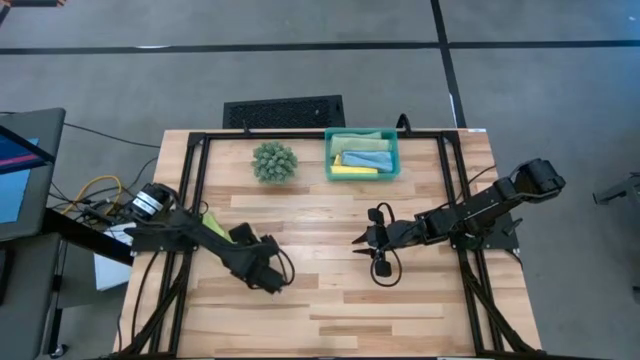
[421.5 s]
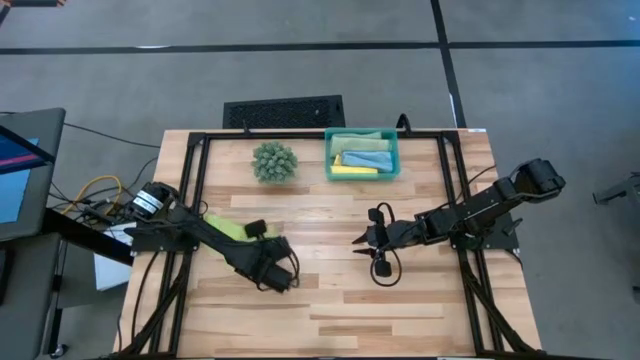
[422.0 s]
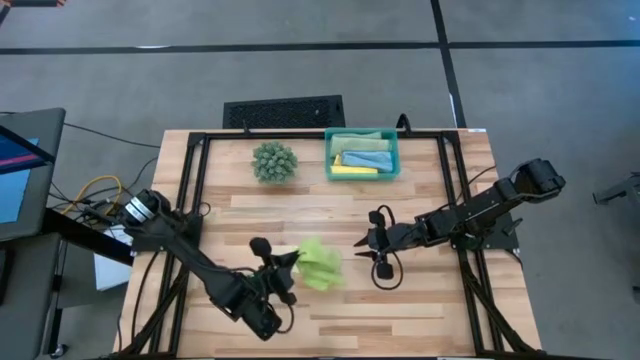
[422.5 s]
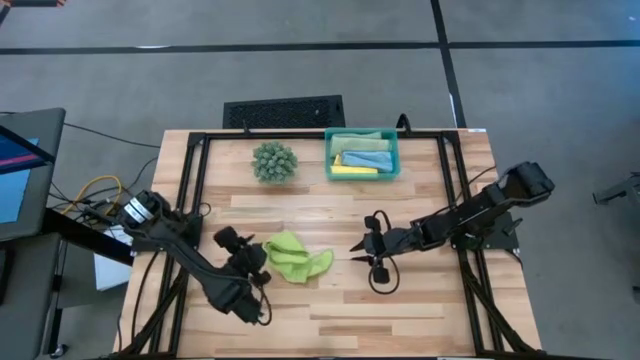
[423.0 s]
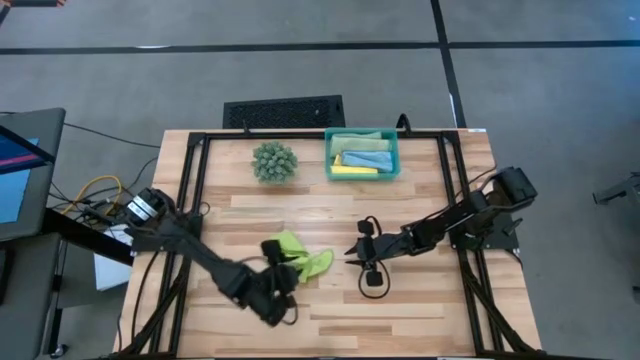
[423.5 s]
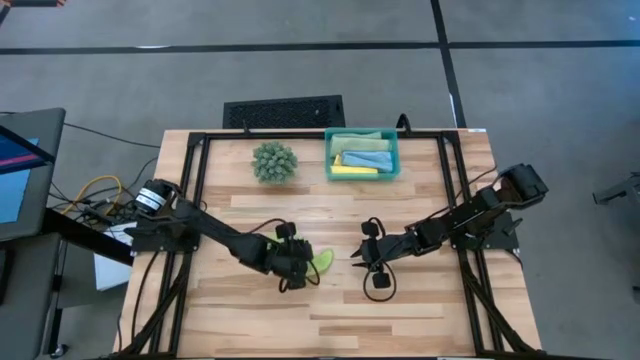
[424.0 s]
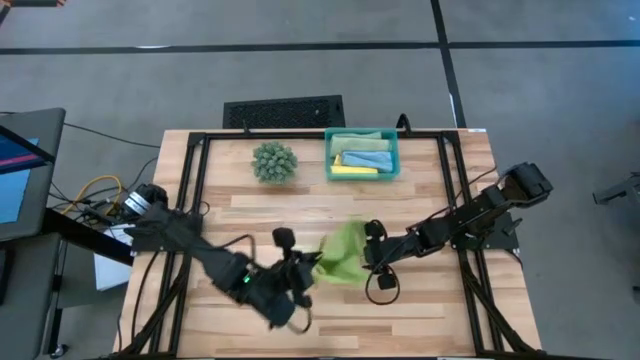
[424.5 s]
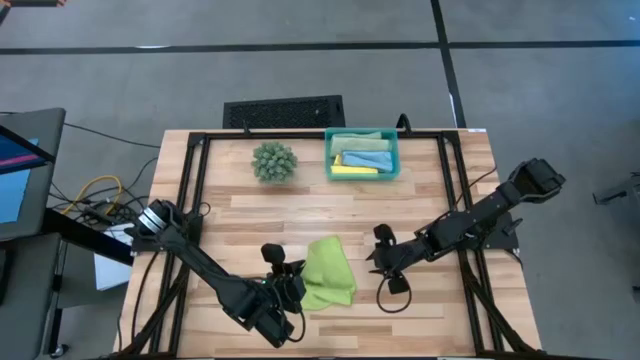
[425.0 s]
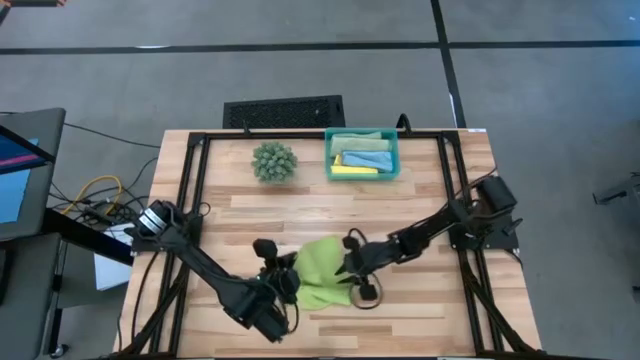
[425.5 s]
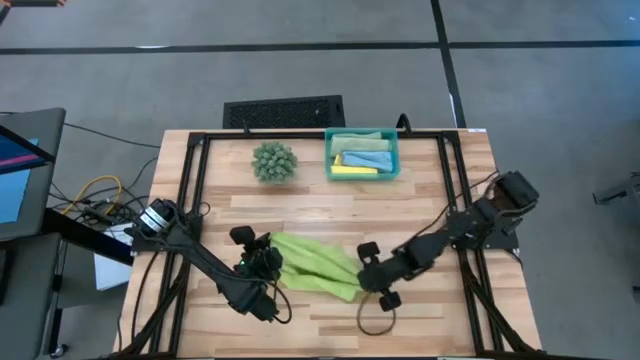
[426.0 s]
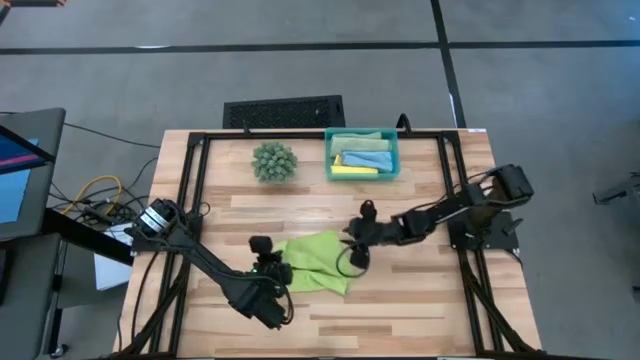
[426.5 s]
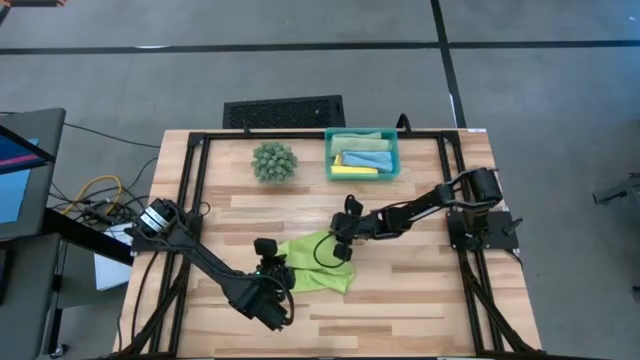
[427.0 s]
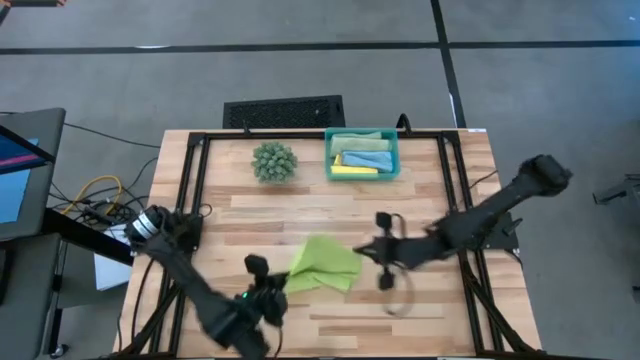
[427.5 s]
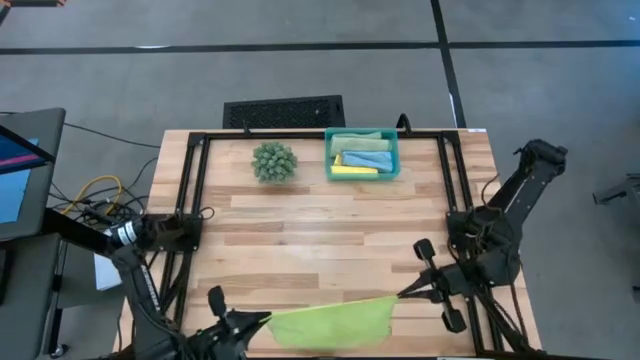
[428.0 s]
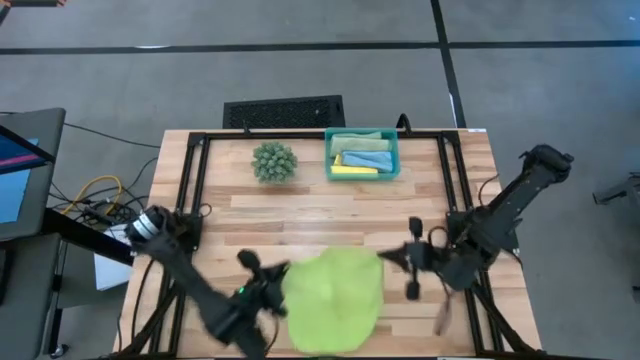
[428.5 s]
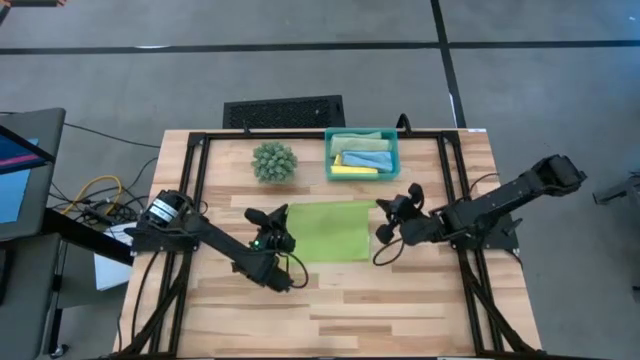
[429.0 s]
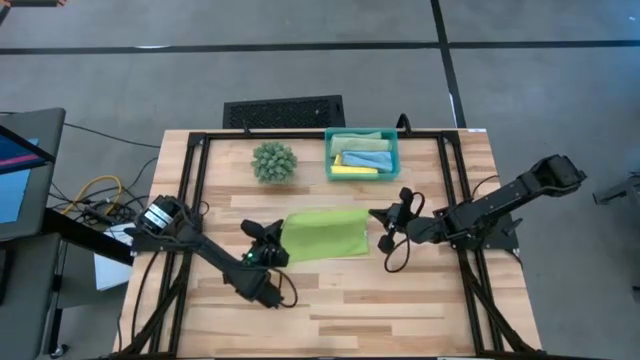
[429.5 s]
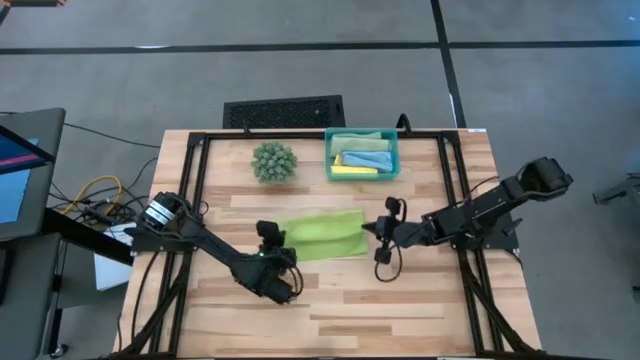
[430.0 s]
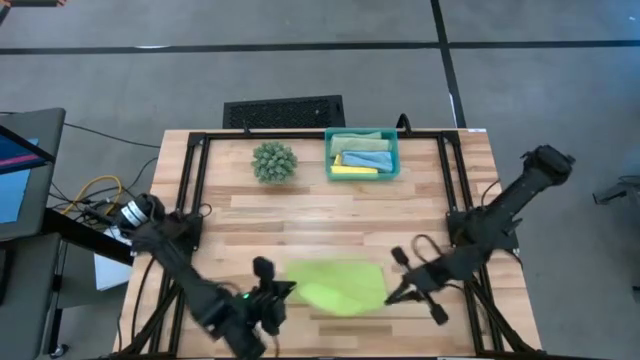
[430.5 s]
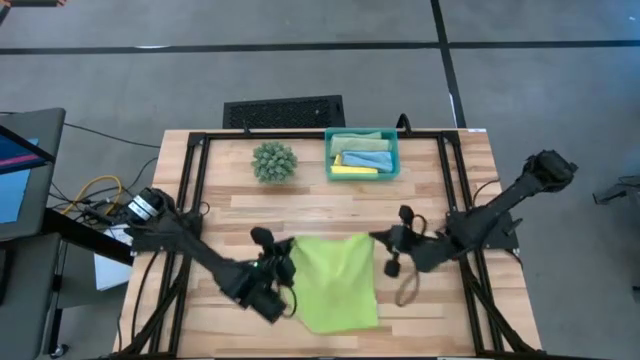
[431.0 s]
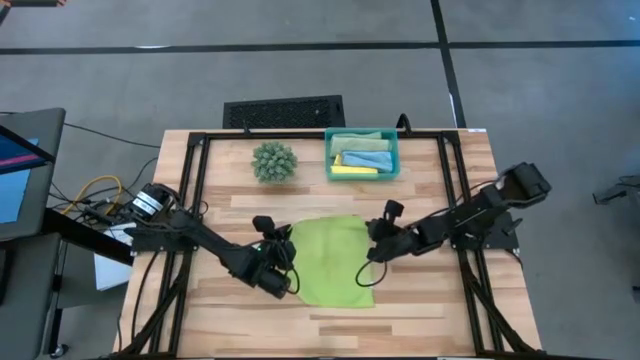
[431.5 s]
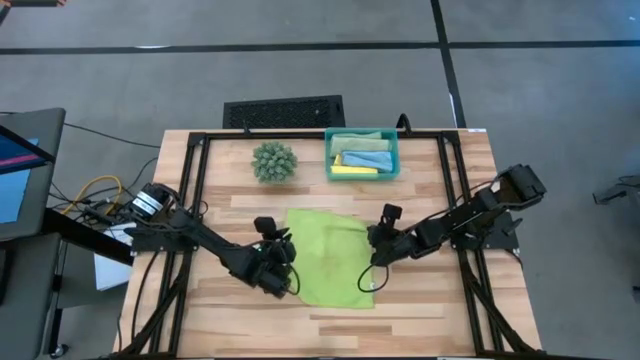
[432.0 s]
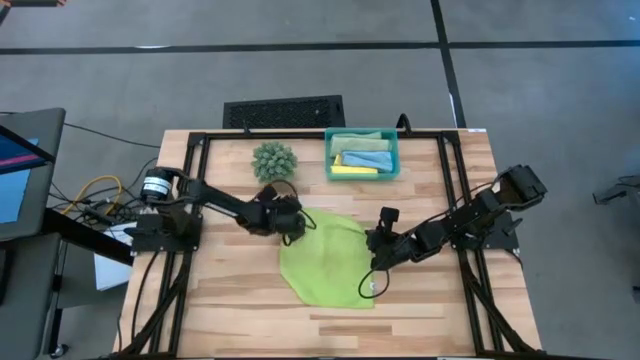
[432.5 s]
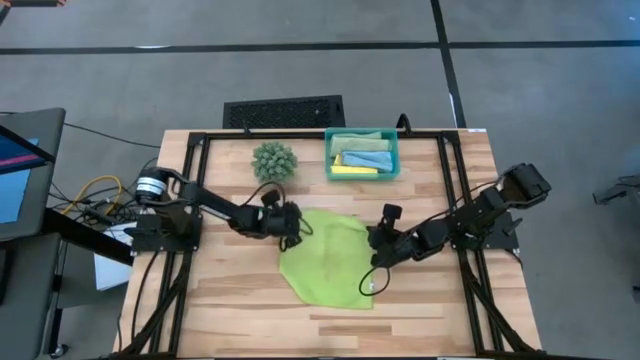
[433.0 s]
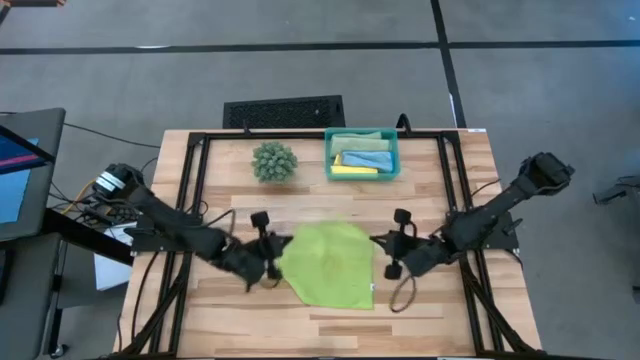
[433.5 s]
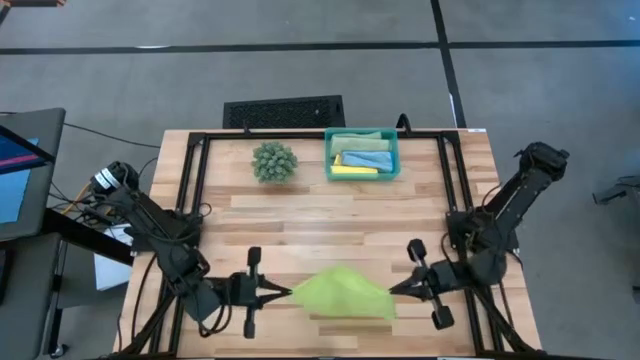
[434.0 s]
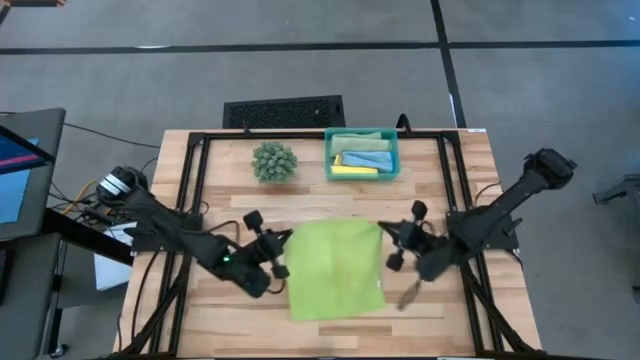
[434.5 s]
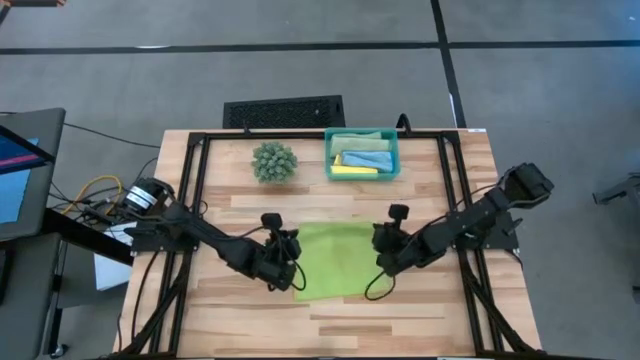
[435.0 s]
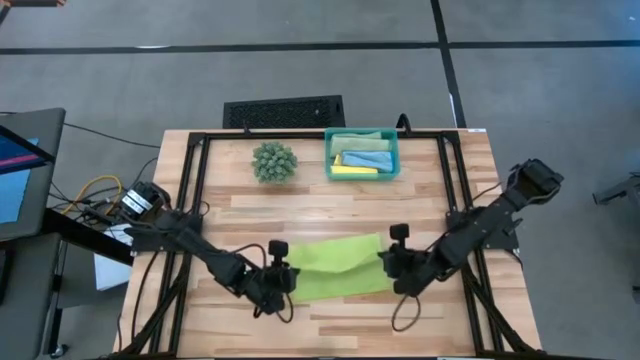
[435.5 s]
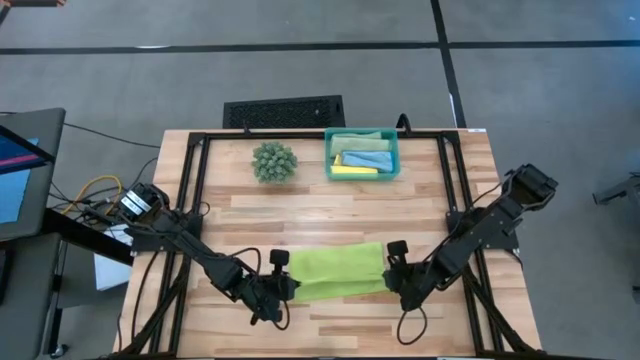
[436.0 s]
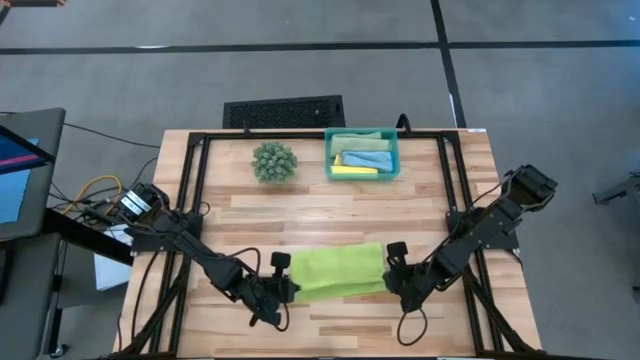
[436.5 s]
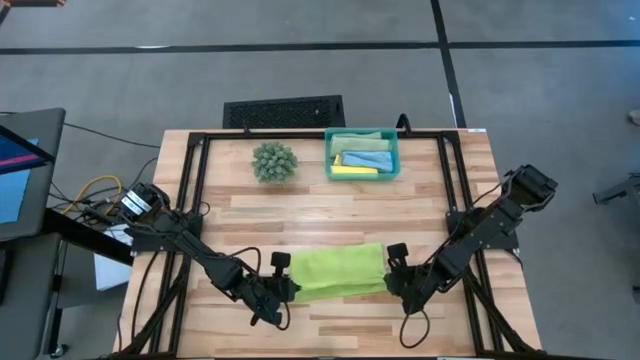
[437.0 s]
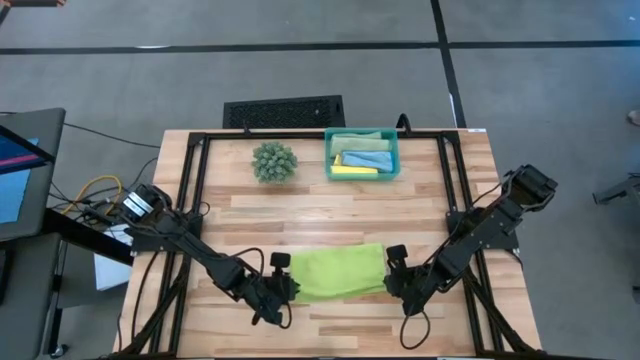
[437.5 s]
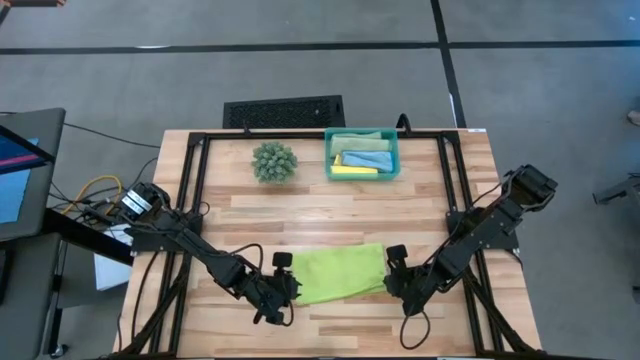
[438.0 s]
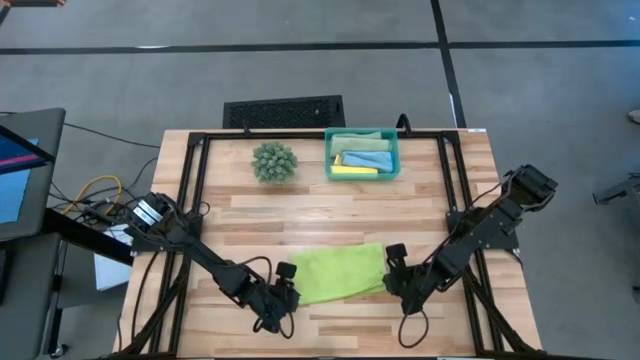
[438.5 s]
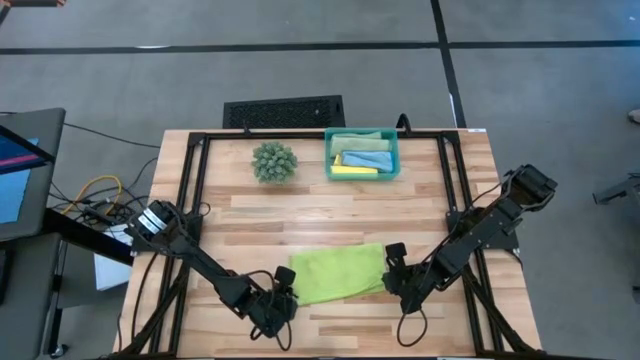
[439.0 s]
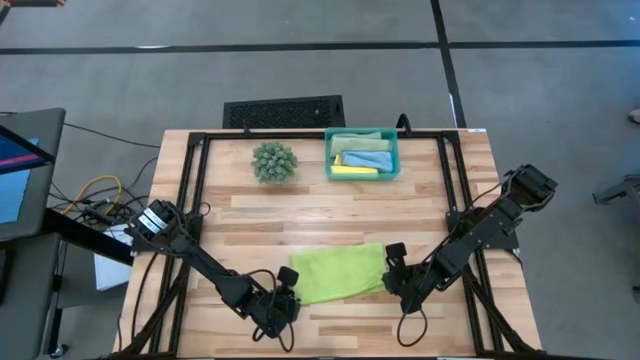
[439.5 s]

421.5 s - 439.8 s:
Task: Roll microfiber towels into tight, uniform cylinder then place into a basket
Roll the green microfiber cloth

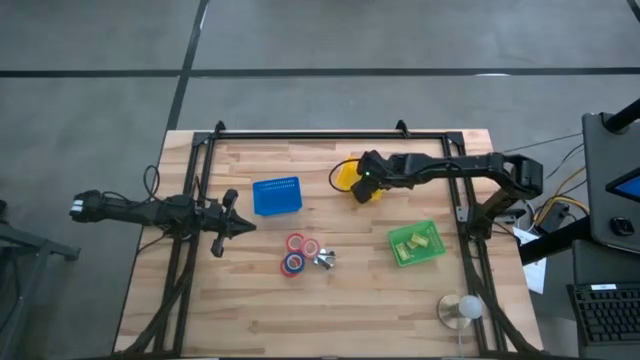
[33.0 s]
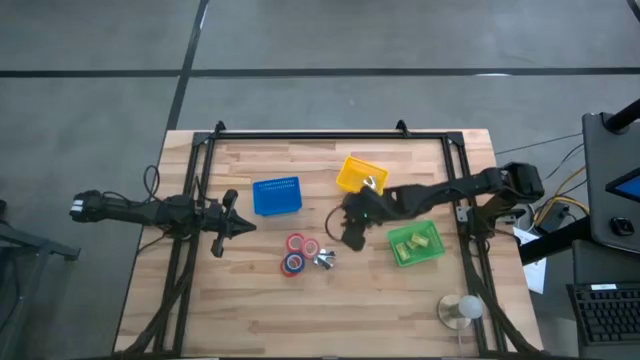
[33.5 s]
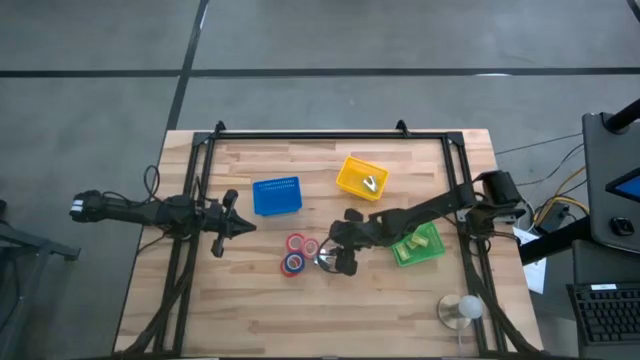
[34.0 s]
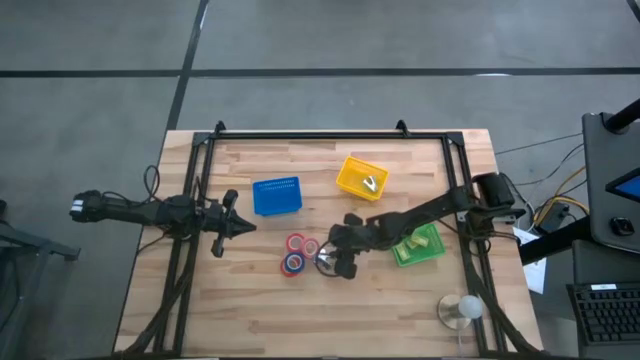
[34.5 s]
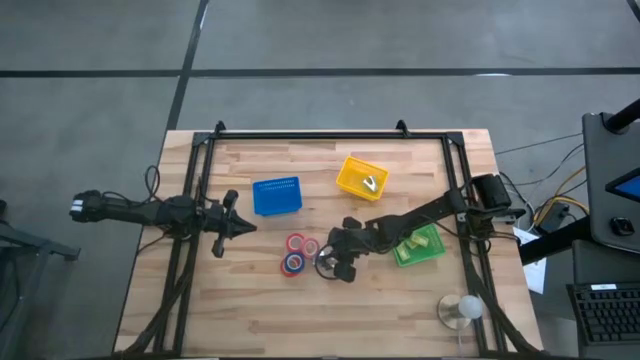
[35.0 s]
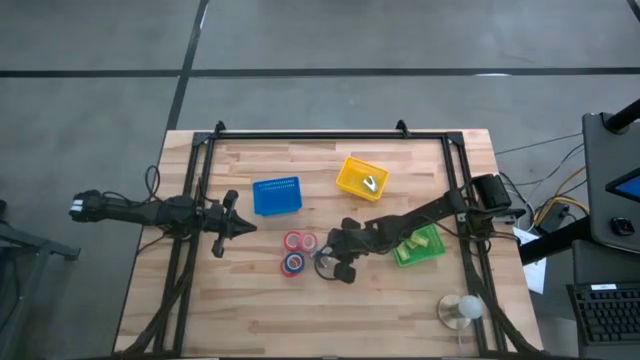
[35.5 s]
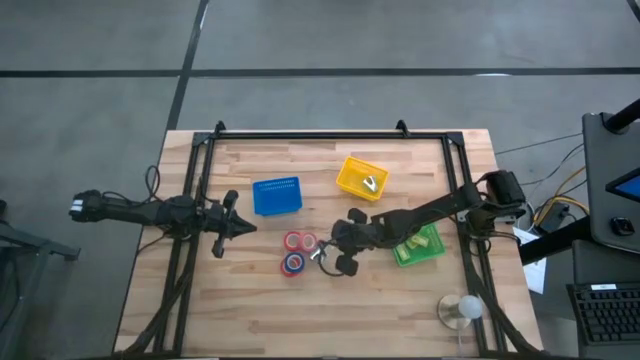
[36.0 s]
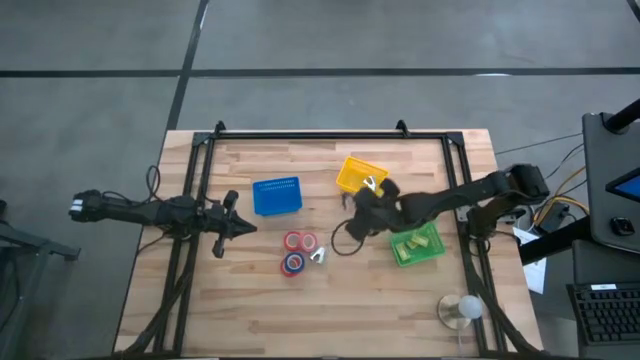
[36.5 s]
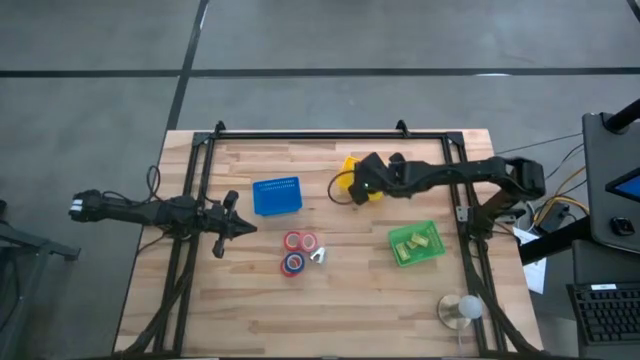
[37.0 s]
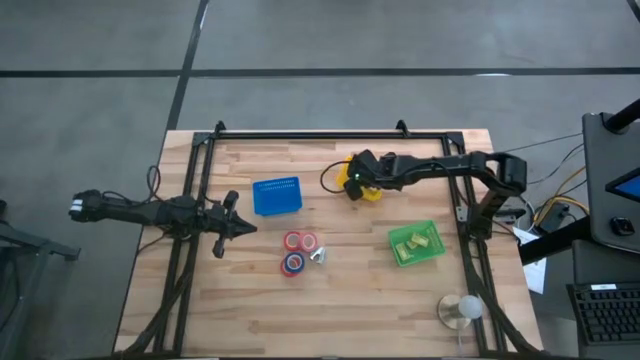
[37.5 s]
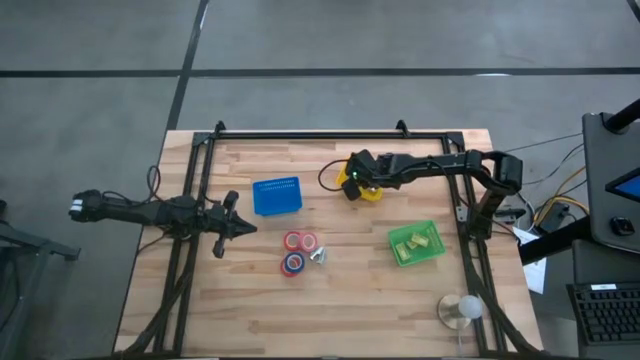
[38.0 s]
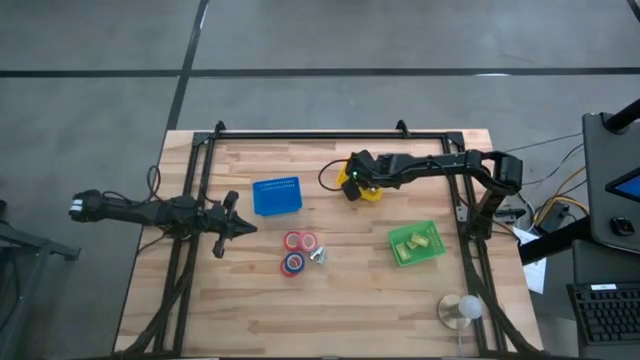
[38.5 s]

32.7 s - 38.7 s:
Task: Pick and place Stapler, Stapler remover, tape
Put the black staple remover into the yellow bin
